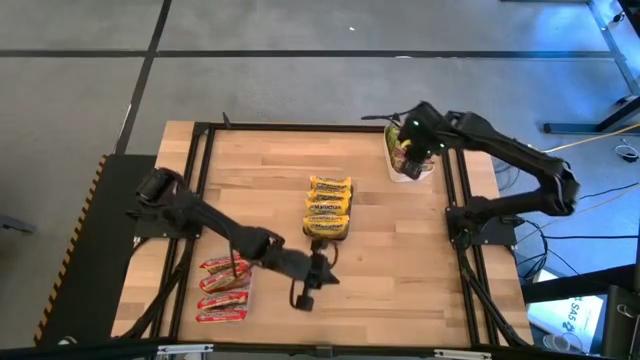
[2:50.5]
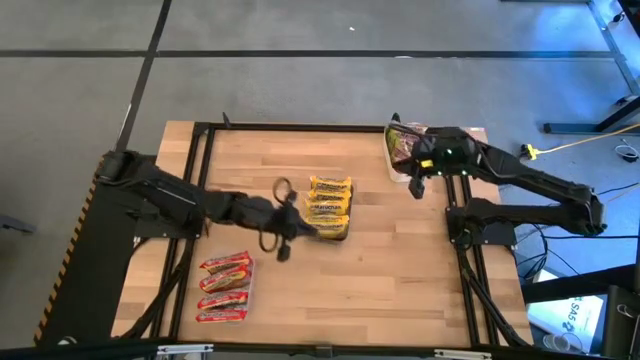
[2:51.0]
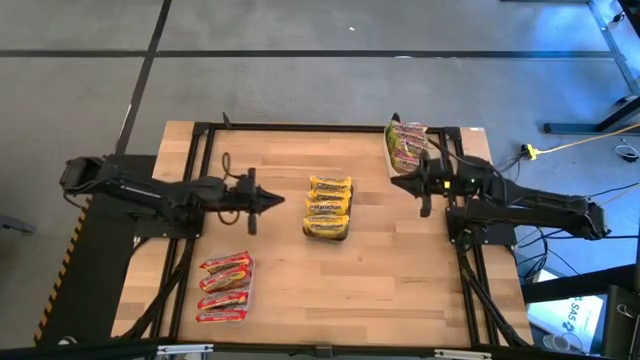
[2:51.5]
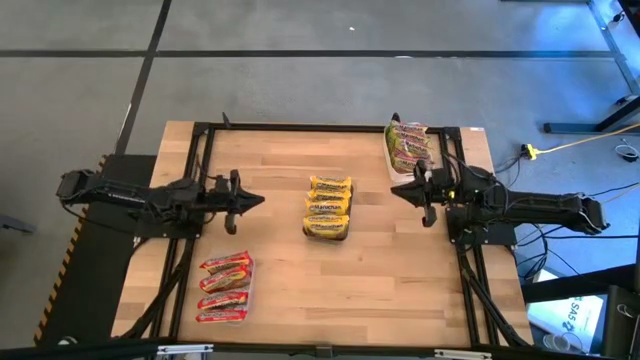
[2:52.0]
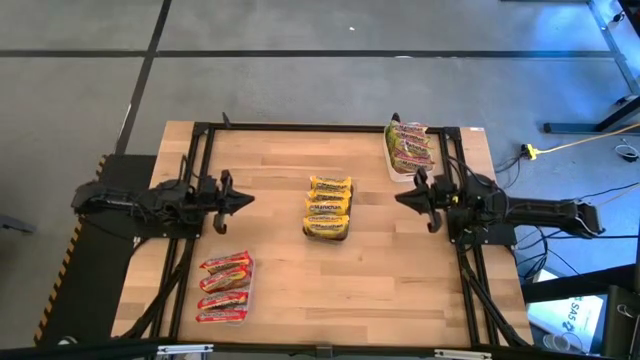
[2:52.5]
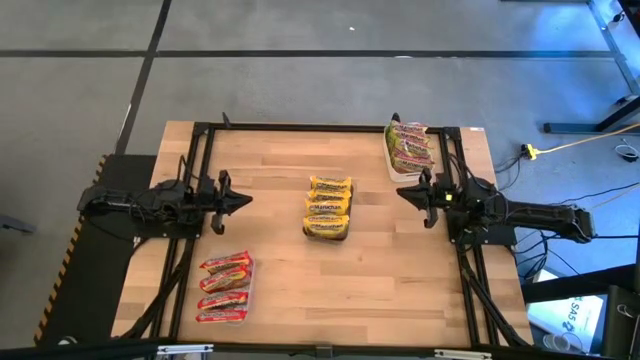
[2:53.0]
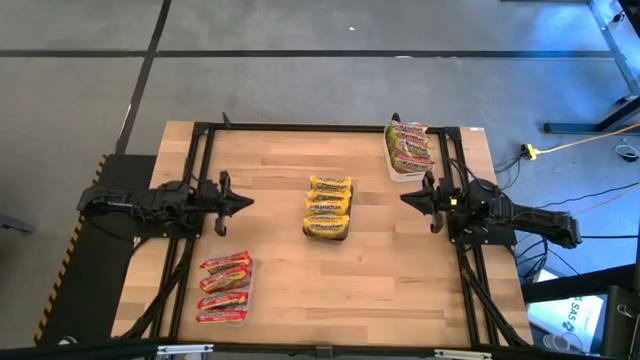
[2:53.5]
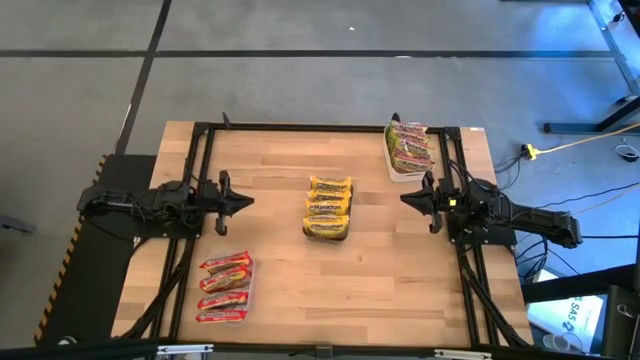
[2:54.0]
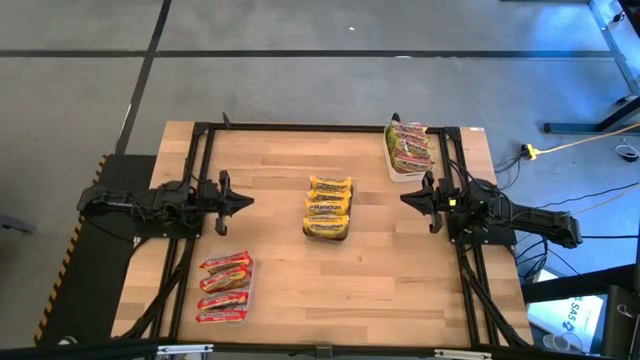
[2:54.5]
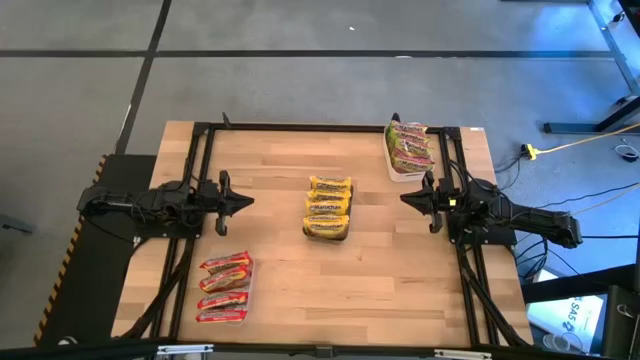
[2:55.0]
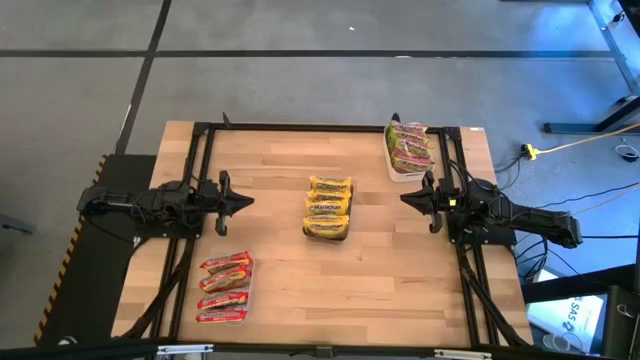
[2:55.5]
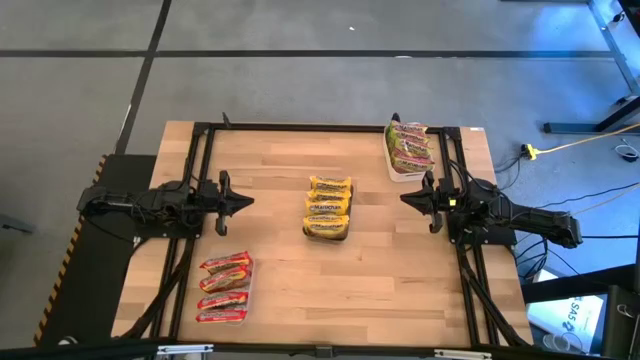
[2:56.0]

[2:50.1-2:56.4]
Task: Sort Maruchan noodles
Return to Home Position

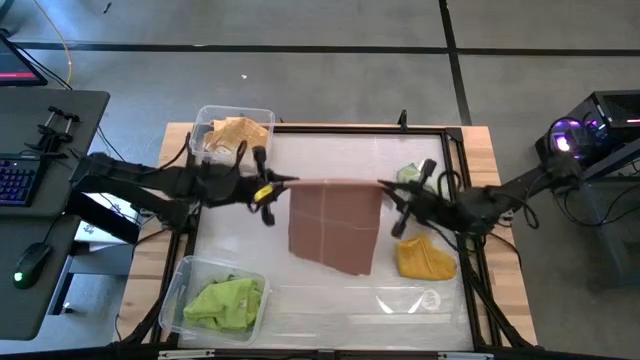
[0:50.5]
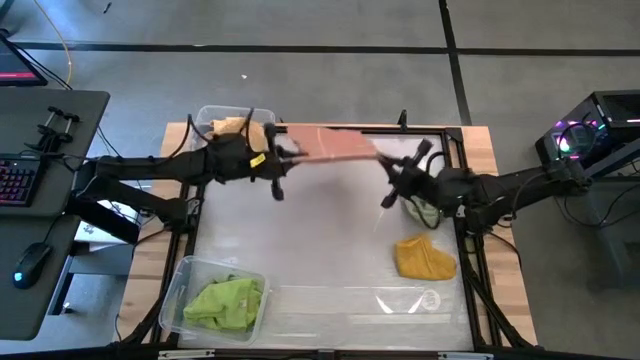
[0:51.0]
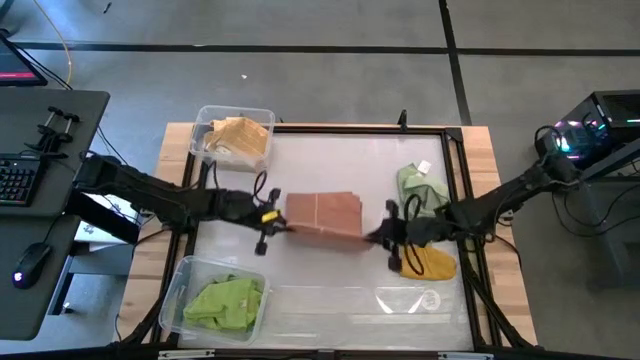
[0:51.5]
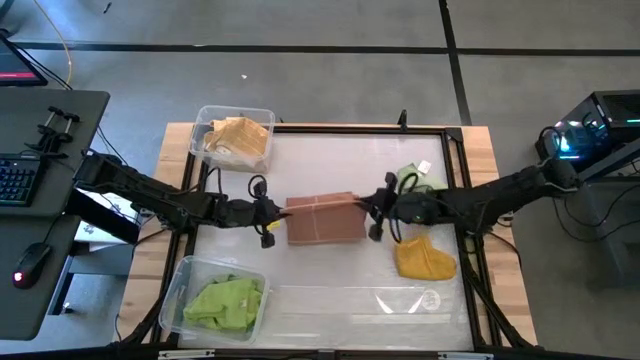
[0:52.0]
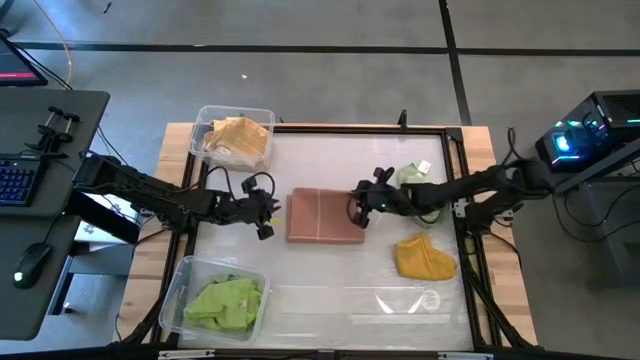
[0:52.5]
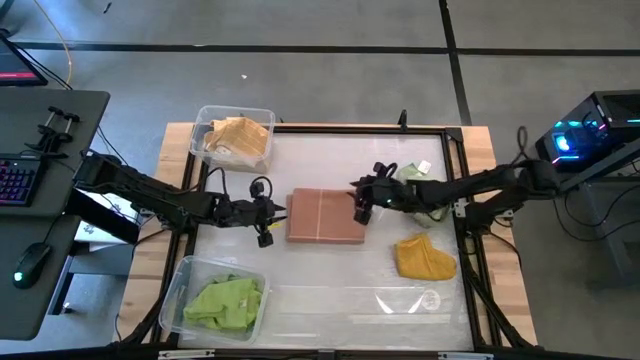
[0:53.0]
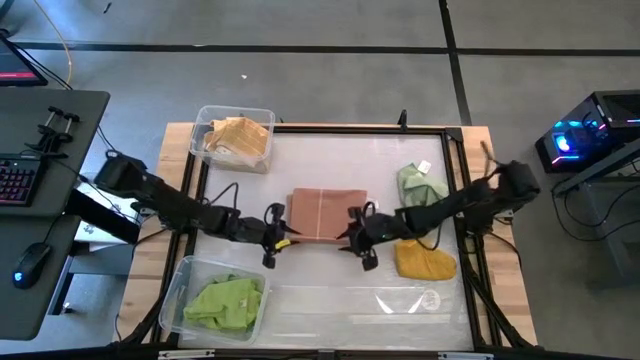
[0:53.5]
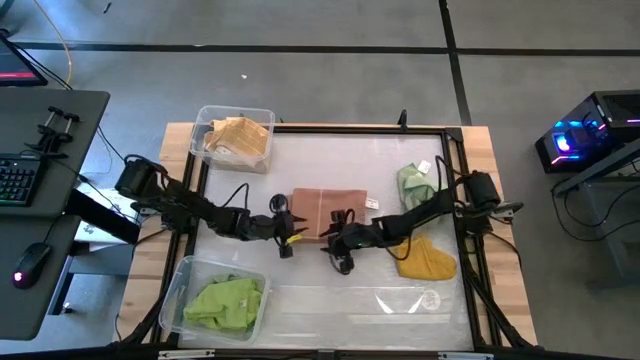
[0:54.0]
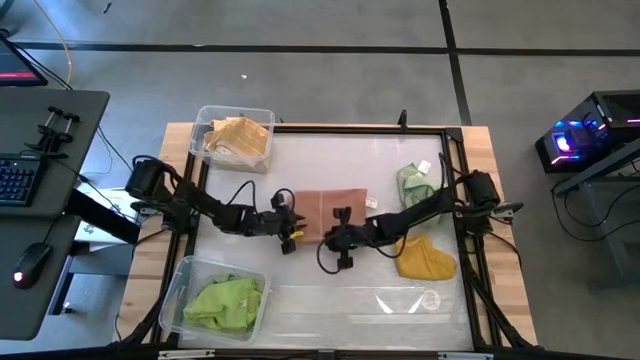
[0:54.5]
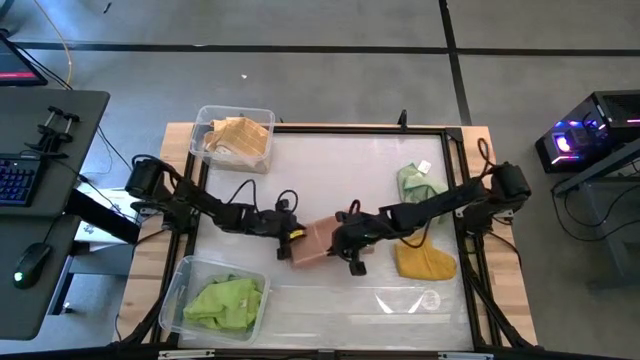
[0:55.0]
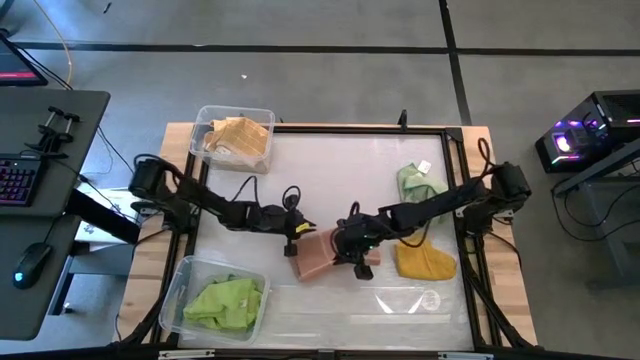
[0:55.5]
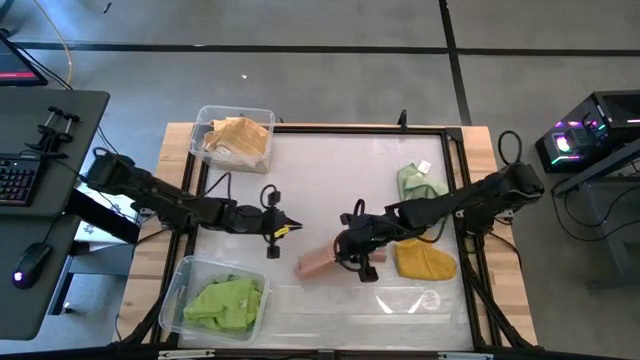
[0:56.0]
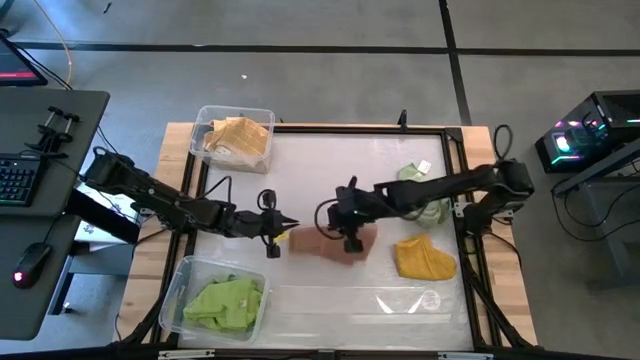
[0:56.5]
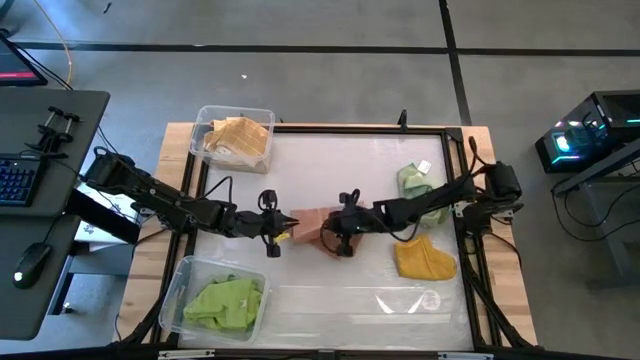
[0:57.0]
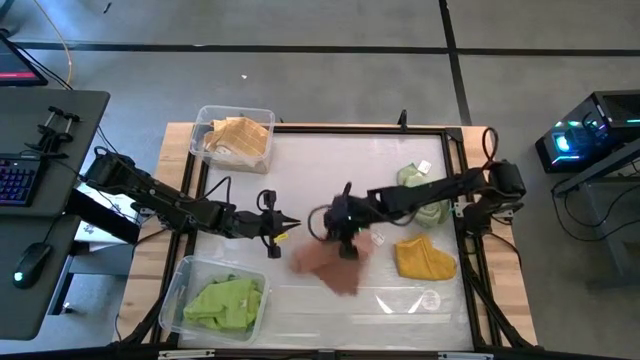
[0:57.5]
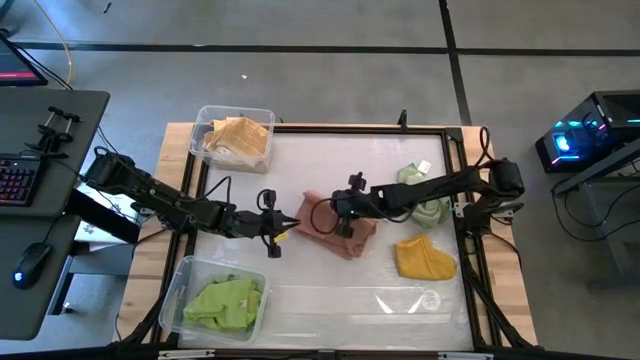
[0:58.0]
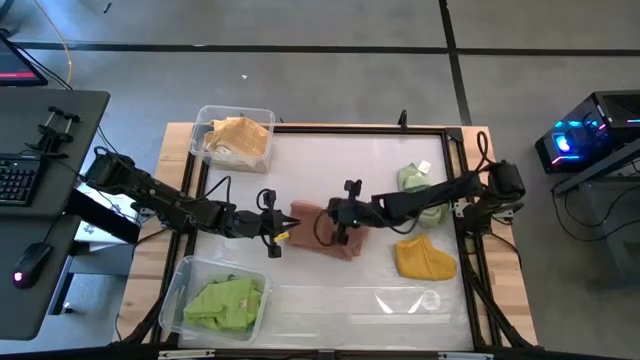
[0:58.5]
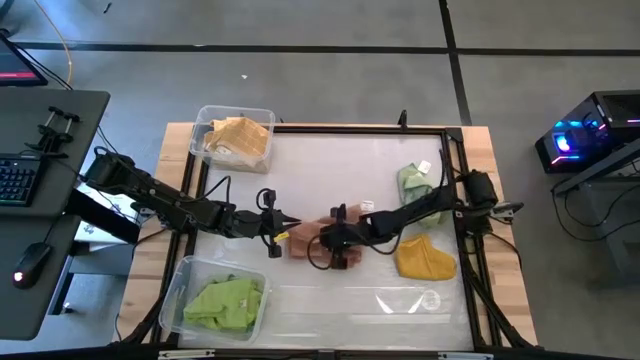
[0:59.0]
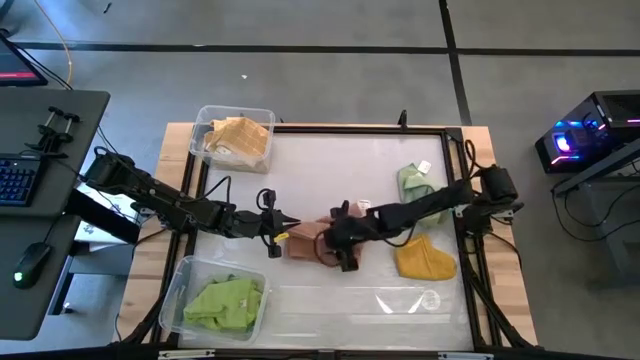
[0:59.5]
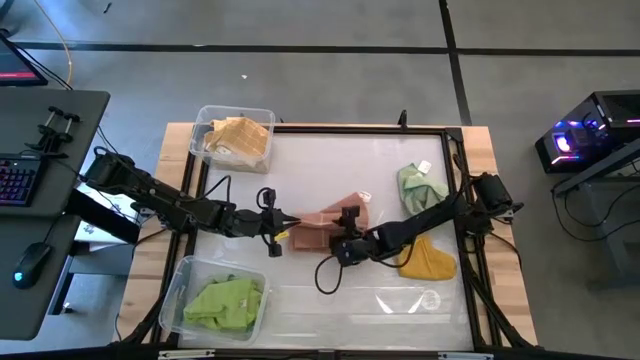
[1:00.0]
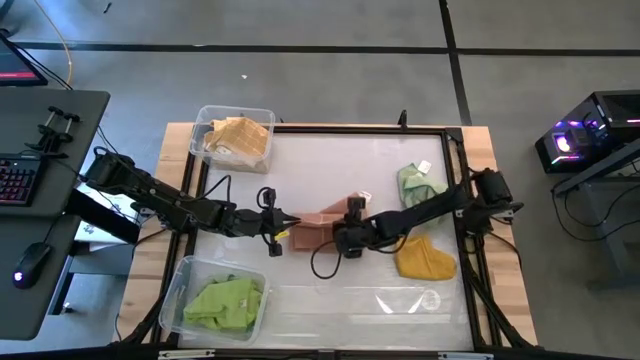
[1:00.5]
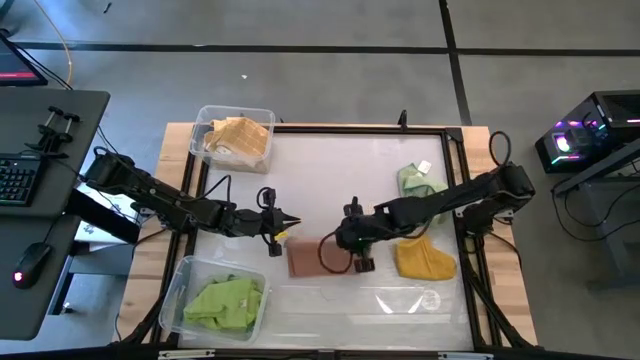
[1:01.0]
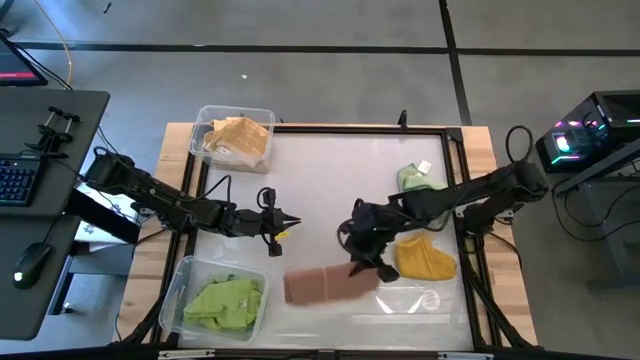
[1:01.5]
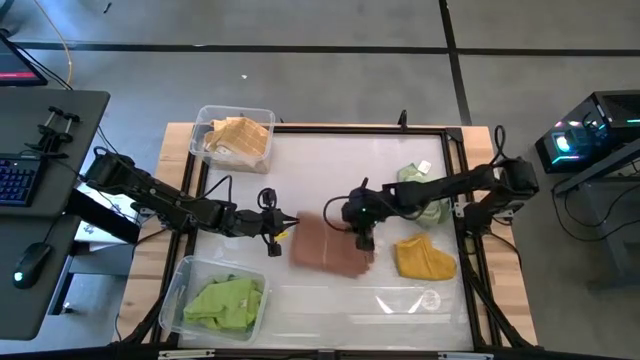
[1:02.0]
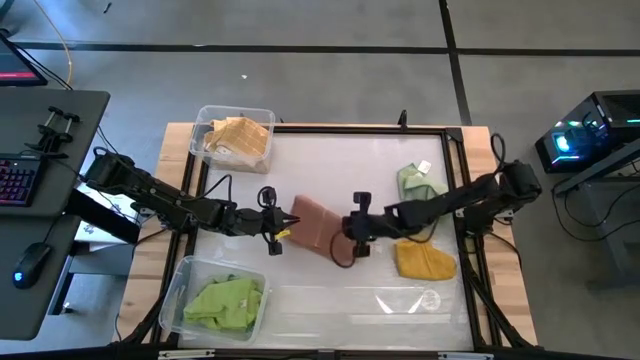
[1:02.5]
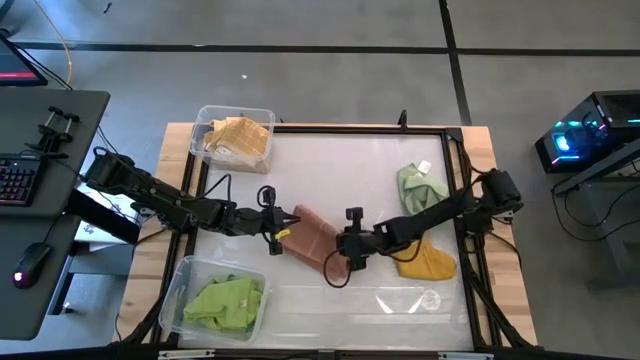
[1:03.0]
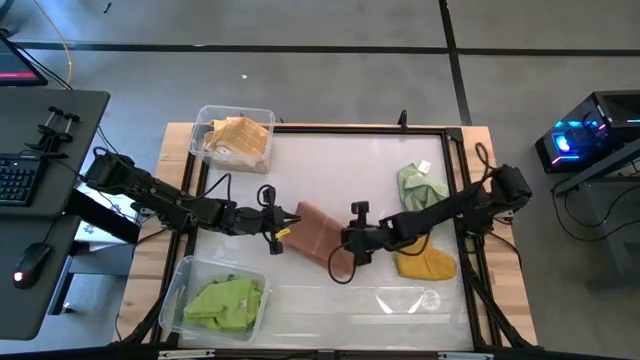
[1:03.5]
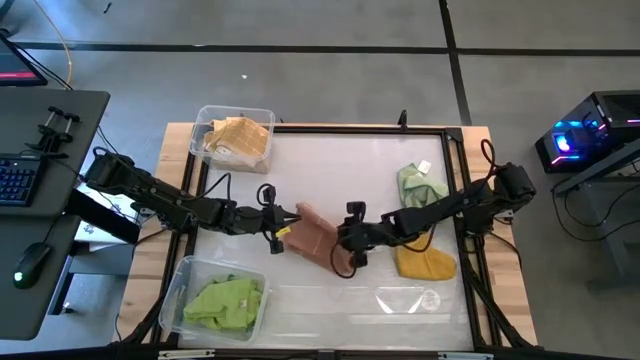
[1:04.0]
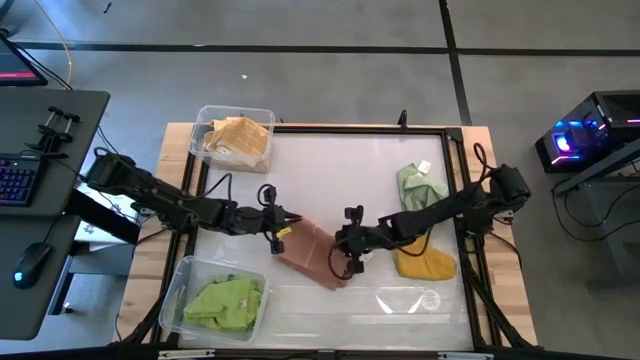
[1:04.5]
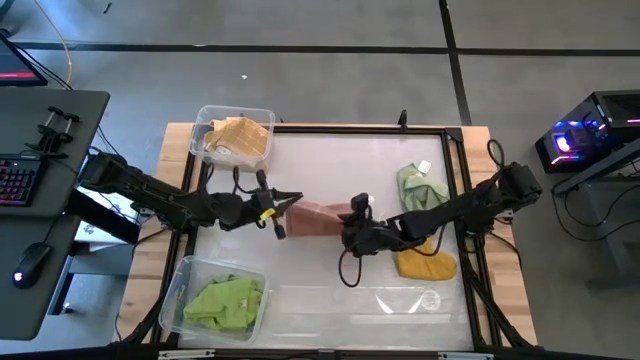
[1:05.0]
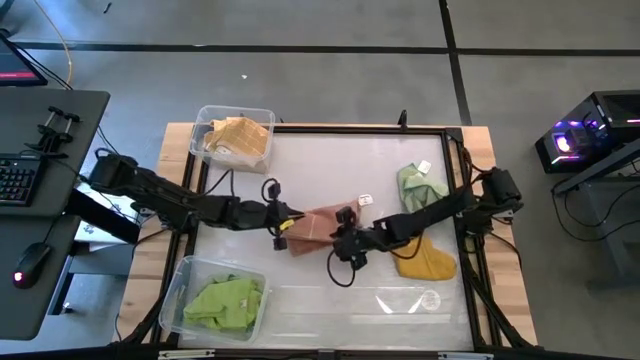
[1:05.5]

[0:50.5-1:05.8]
Task: Sort towels by color in basket
Fold the brown towel
